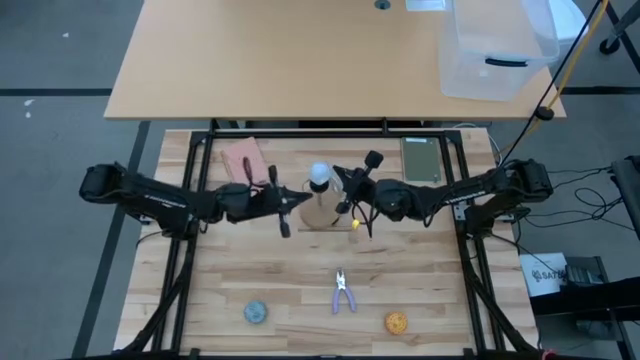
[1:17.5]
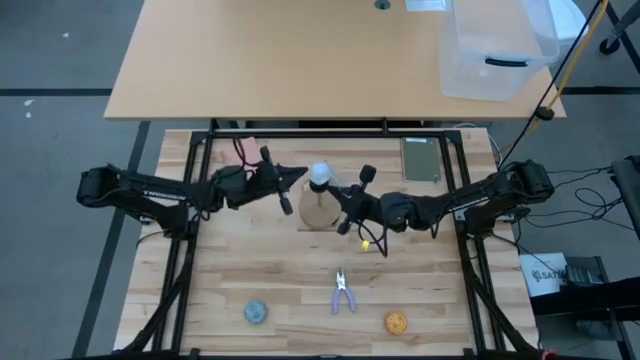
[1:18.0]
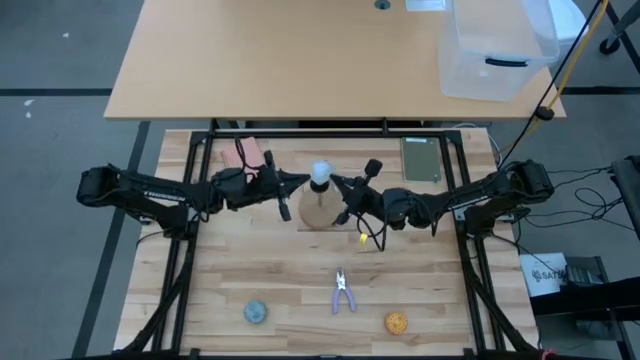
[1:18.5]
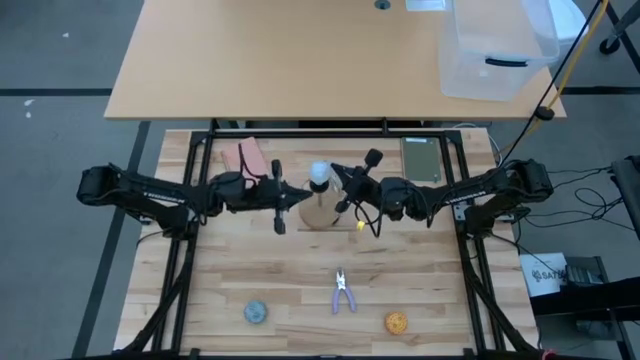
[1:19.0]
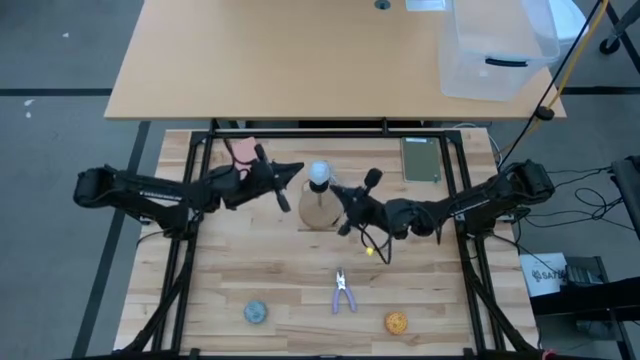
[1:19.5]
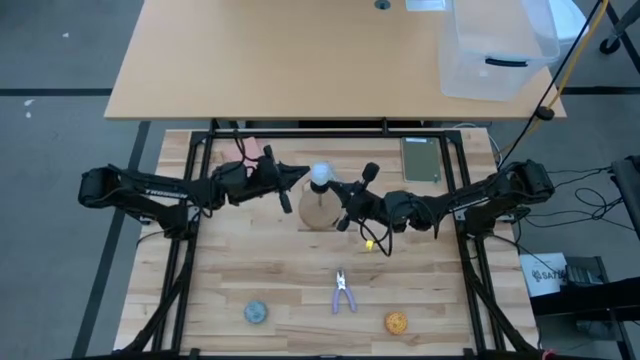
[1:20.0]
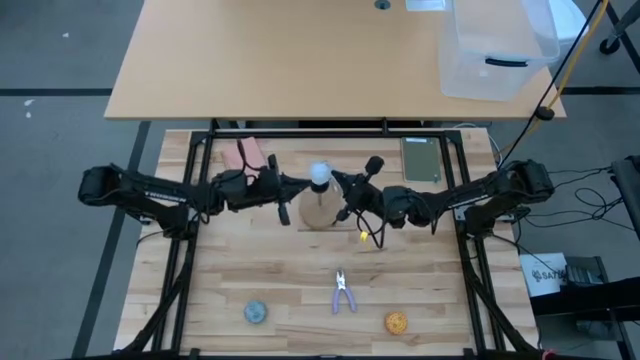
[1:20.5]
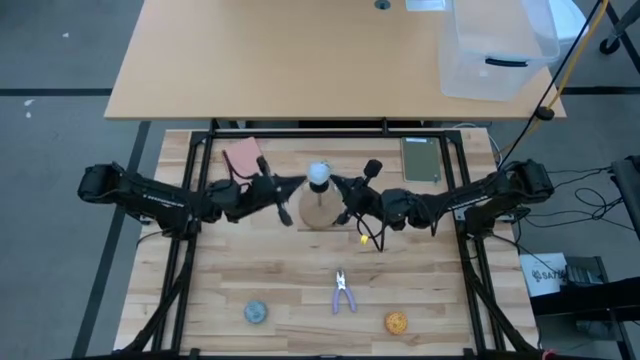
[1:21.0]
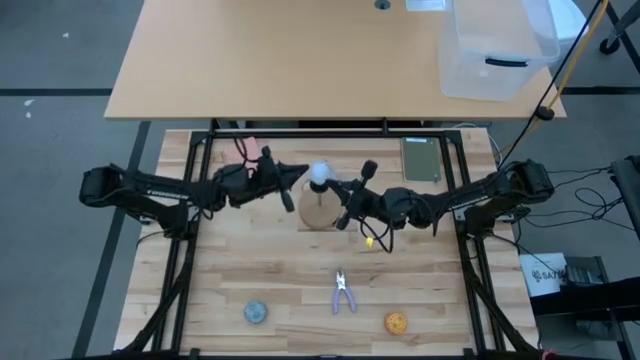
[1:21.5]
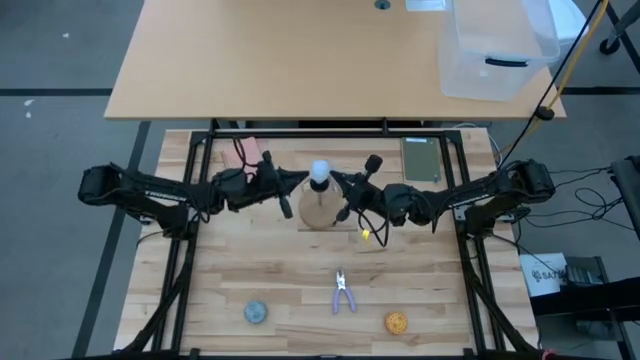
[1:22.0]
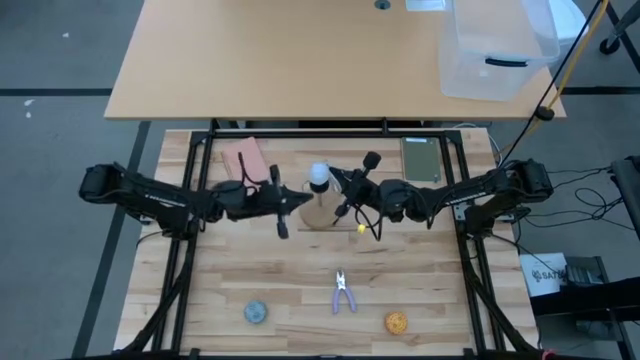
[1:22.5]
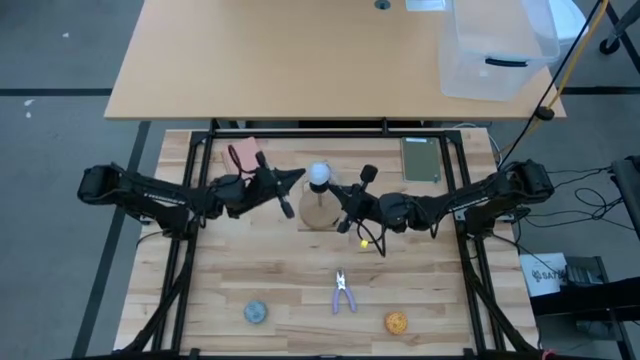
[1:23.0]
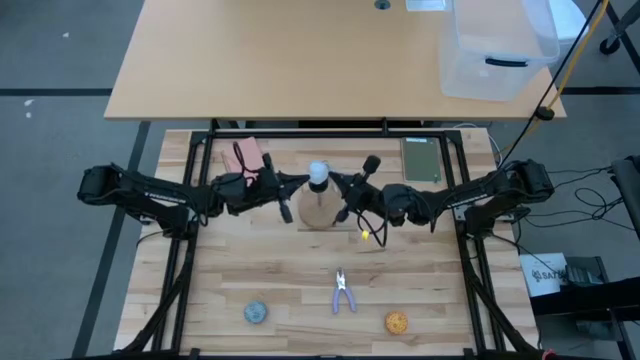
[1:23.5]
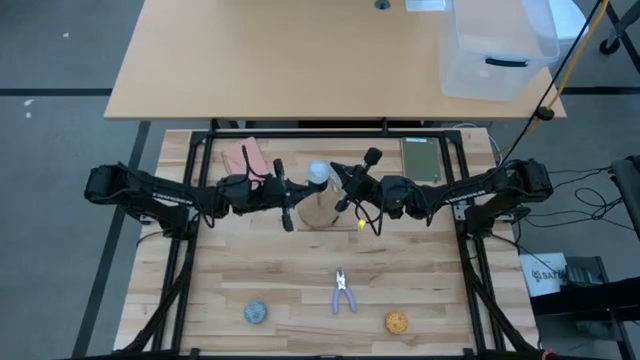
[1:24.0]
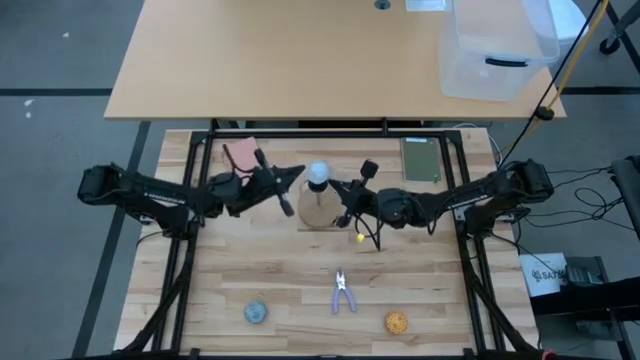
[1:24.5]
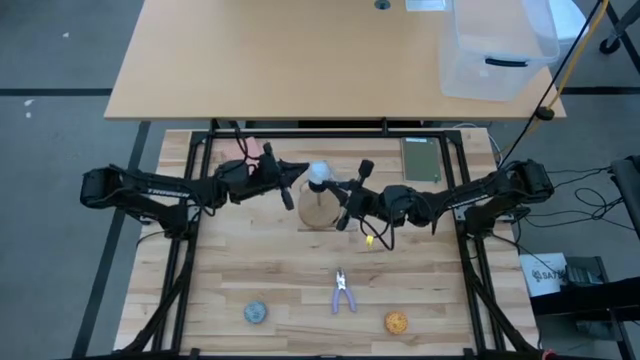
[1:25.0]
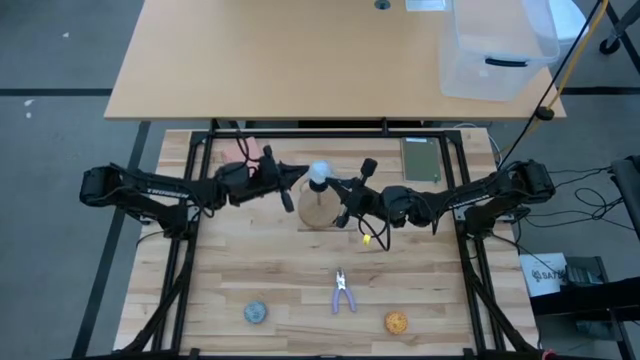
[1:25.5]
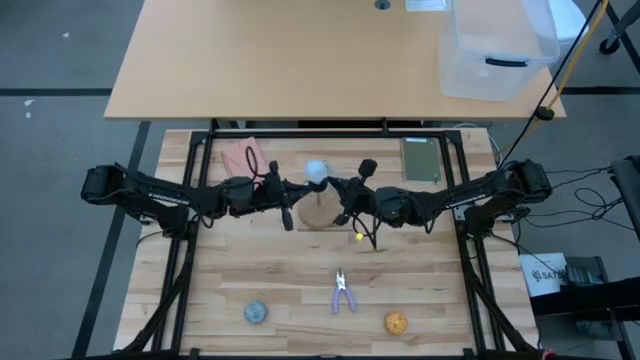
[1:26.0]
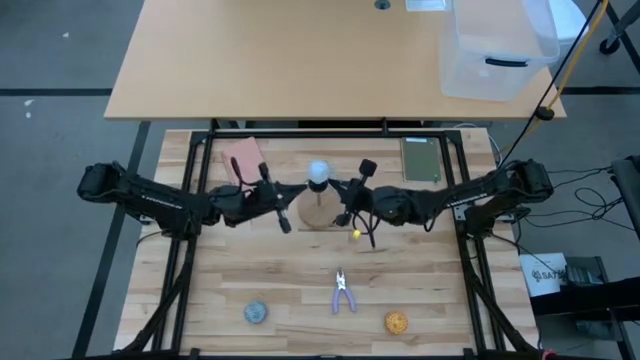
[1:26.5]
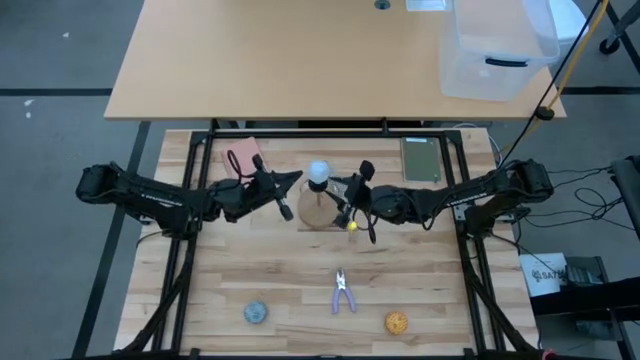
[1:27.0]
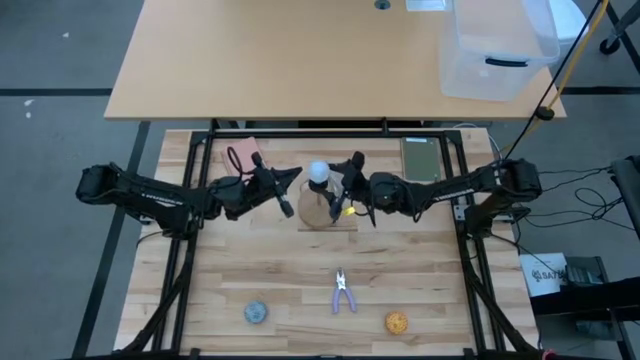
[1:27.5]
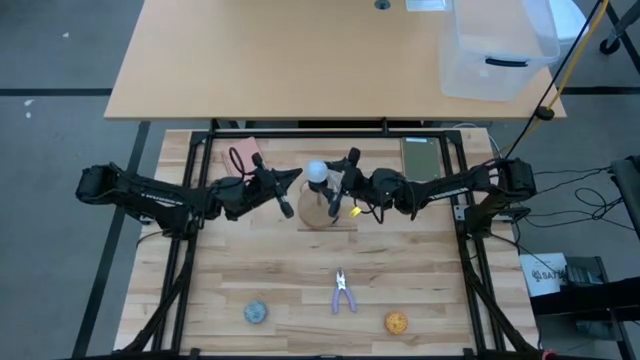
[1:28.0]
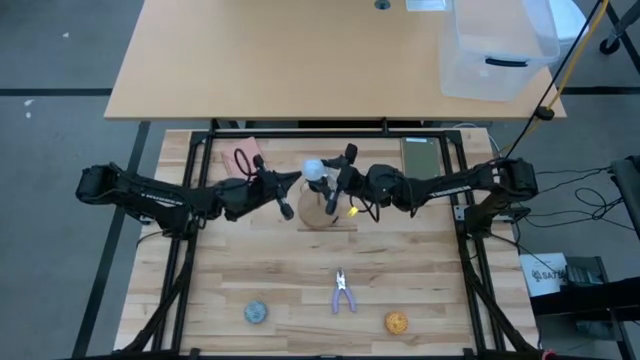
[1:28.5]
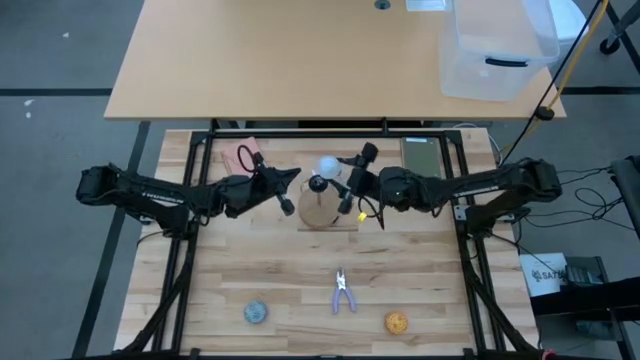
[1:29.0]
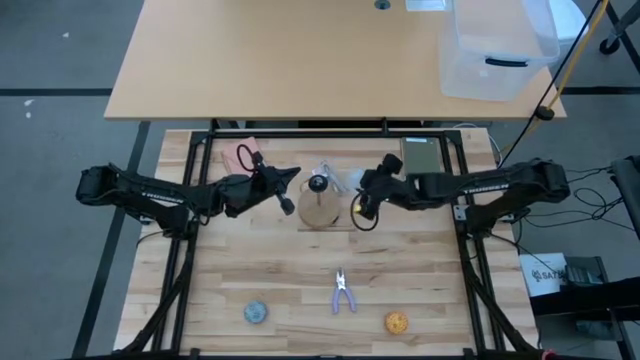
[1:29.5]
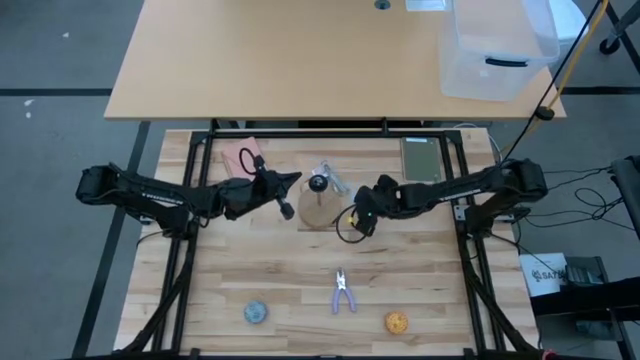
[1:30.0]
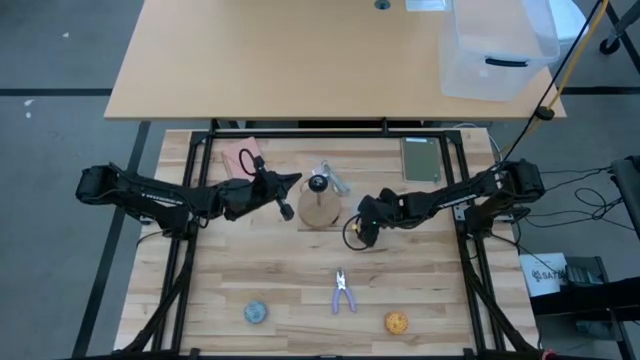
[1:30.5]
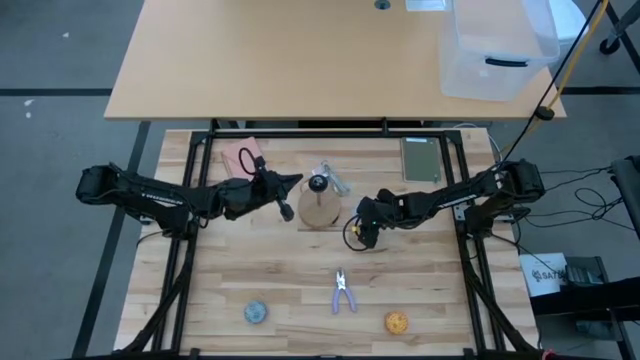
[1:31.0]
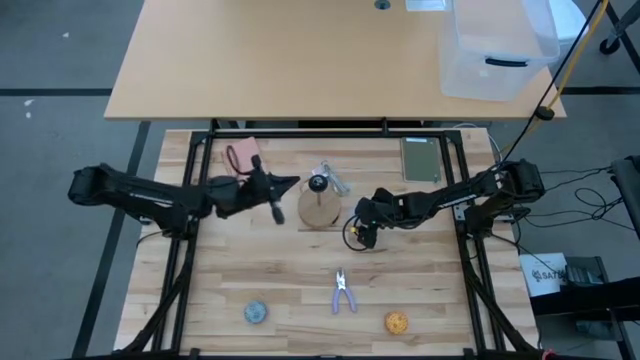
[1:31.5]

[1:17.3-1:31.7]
Task: Screw lightbulb
Remove the lightbulb from the lamp

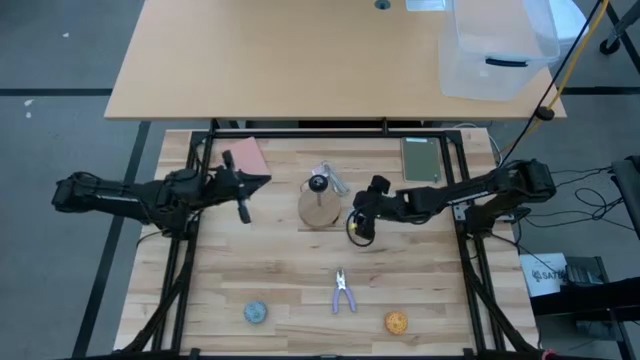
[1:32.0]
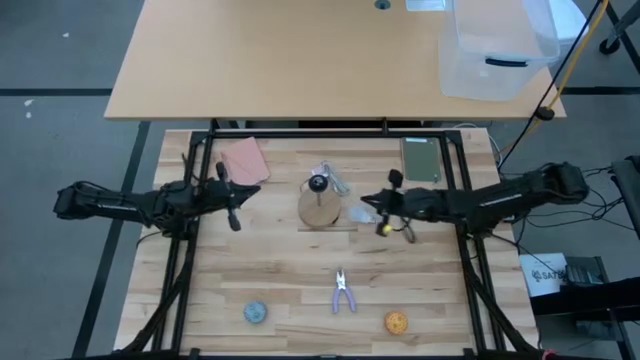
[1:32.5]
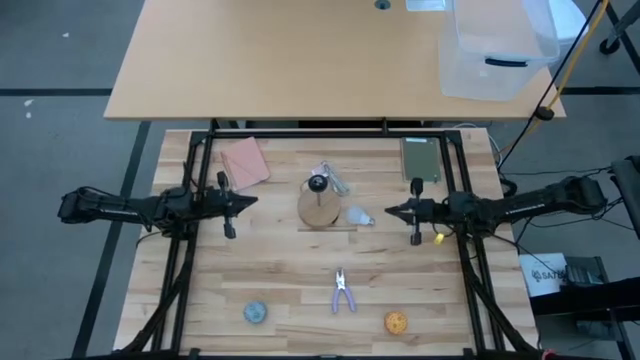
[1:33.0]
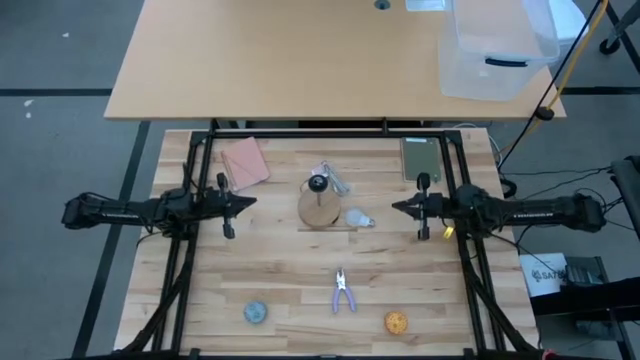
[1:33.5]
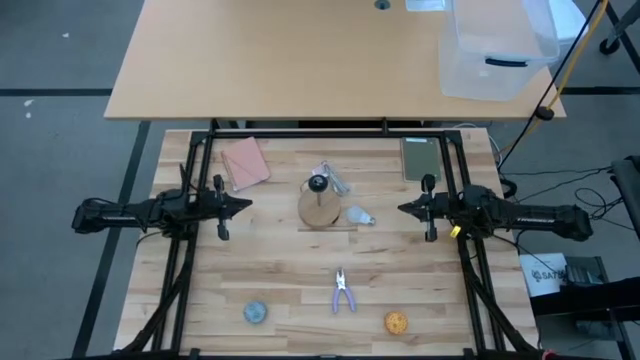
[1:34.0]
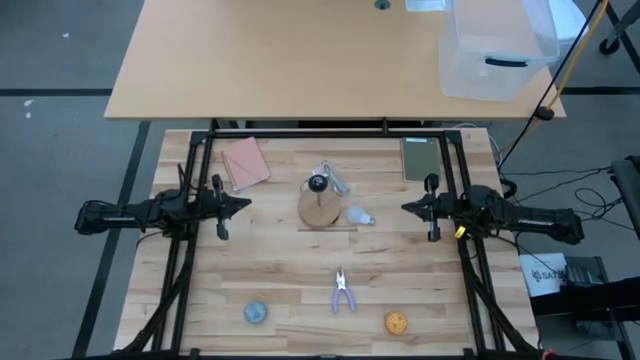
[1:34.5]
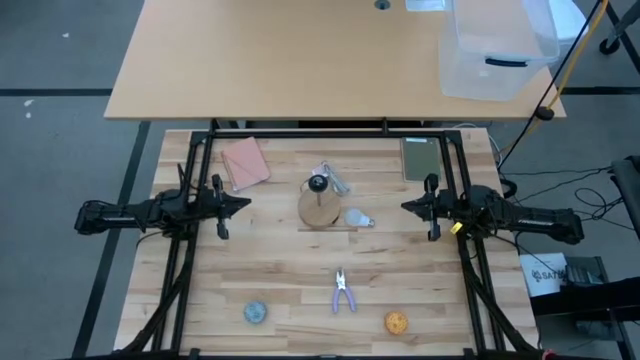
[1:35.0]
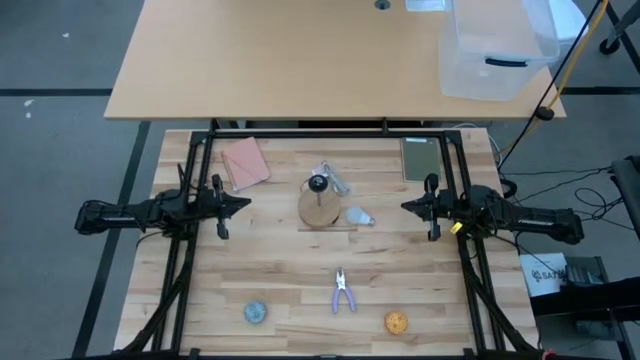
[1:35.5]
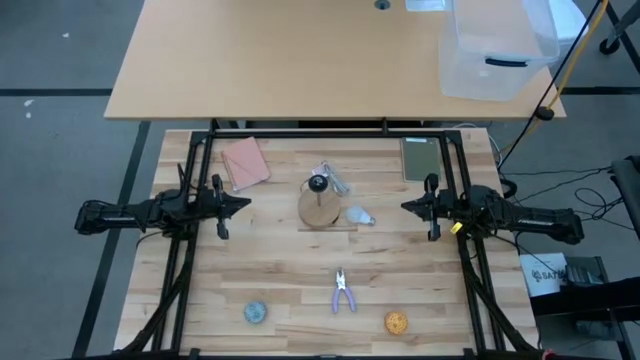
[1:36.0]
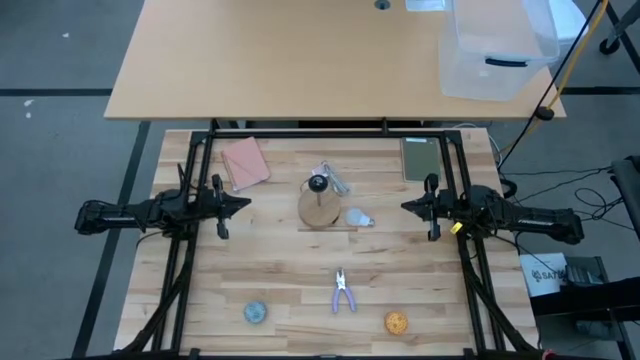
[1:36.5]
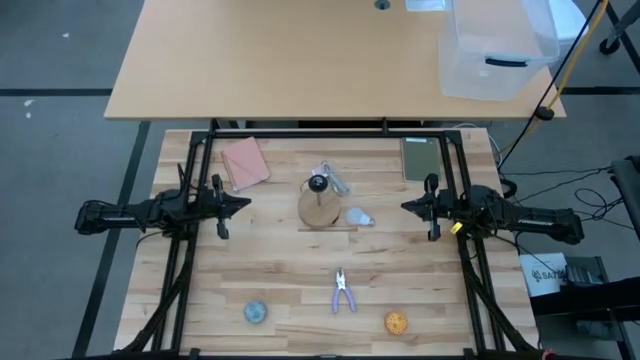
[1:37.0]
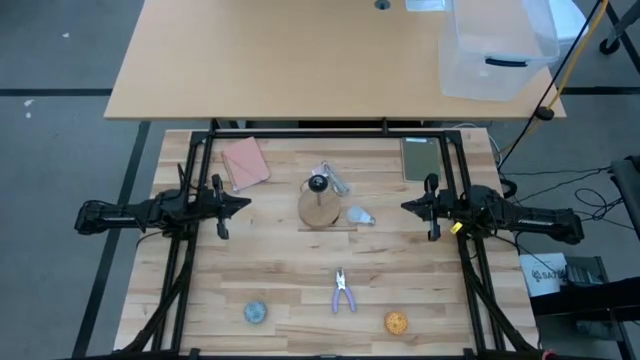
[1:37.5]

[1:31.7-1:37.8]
Return to Home Position
